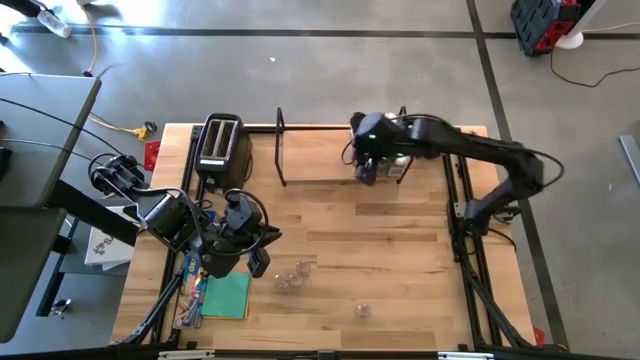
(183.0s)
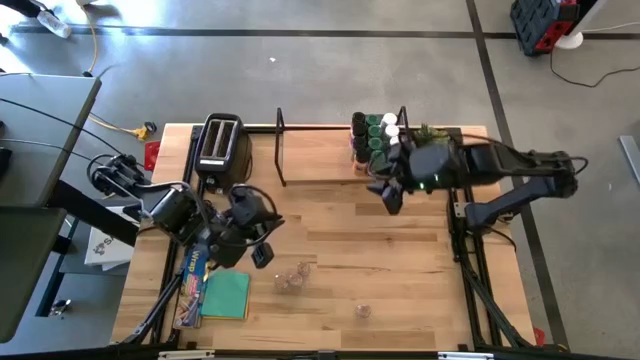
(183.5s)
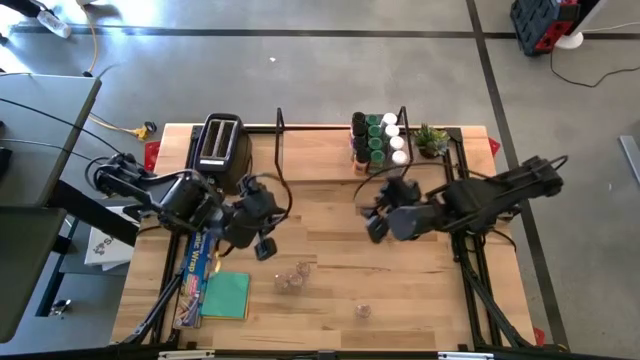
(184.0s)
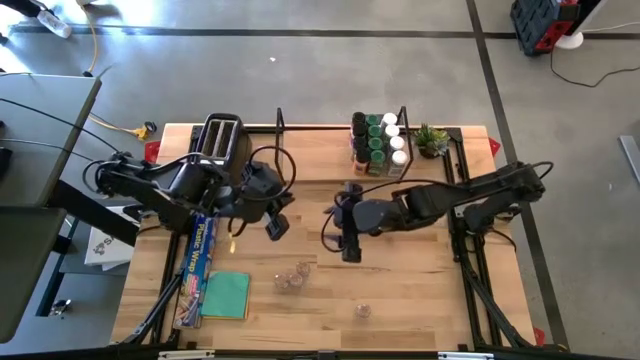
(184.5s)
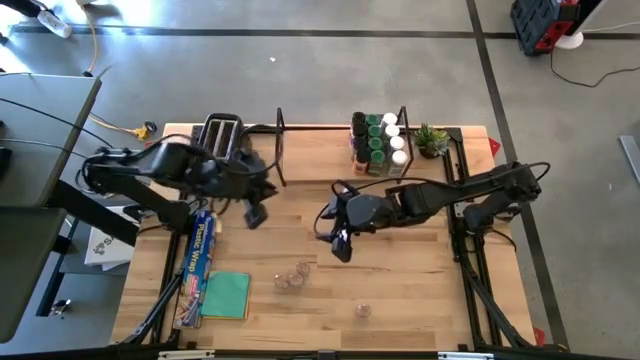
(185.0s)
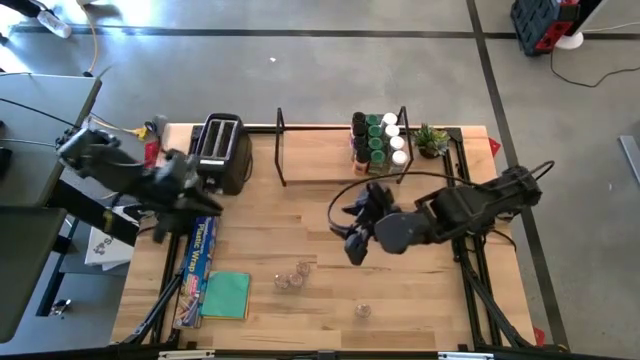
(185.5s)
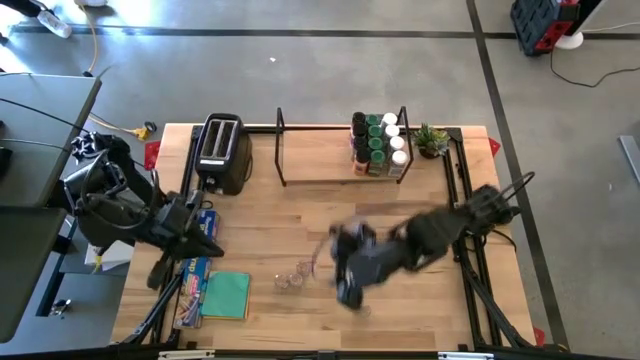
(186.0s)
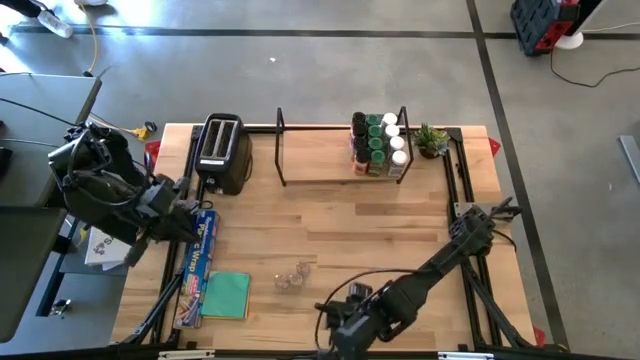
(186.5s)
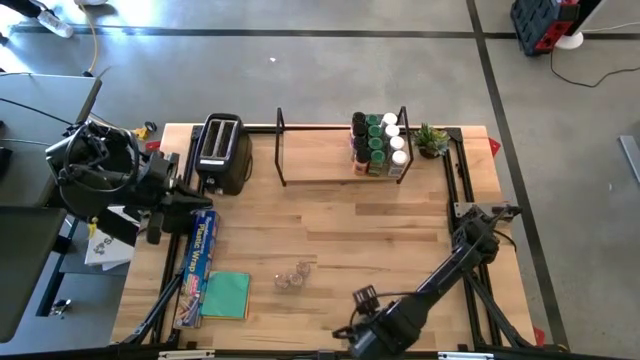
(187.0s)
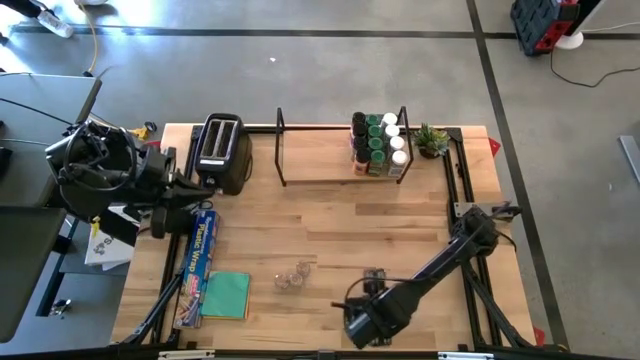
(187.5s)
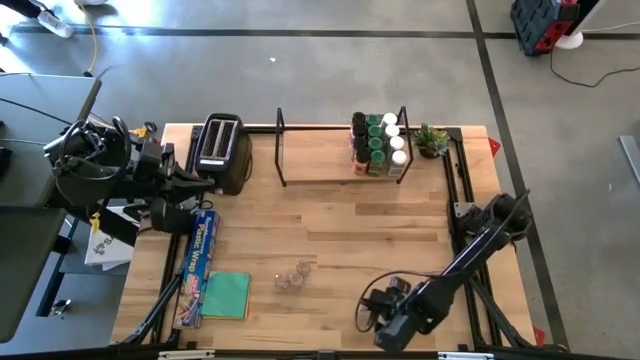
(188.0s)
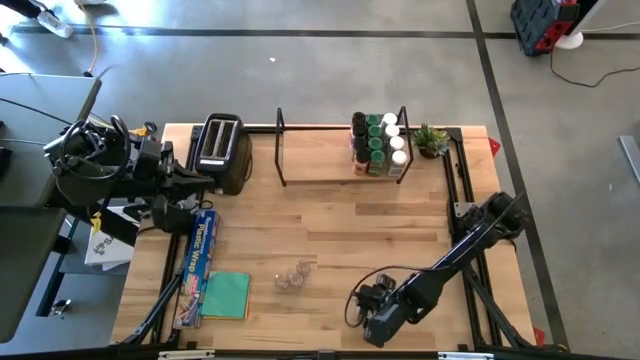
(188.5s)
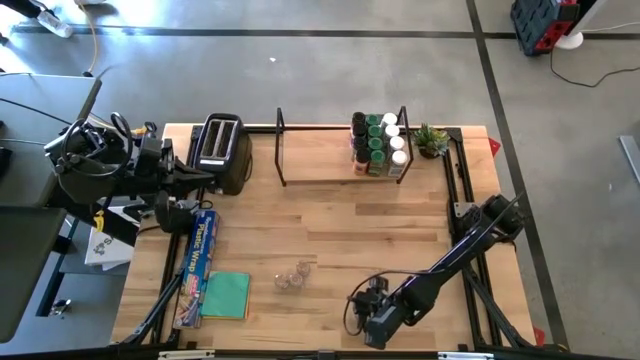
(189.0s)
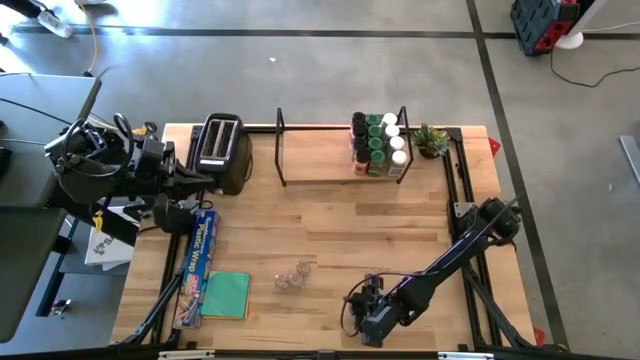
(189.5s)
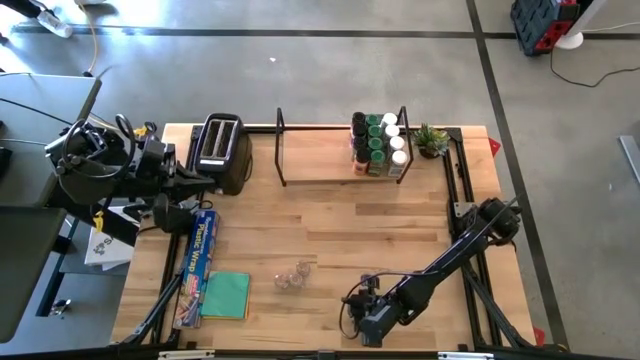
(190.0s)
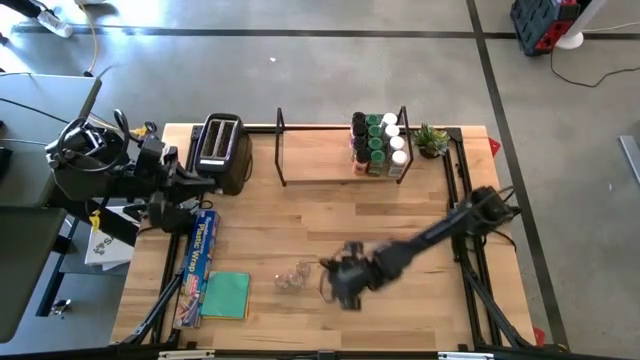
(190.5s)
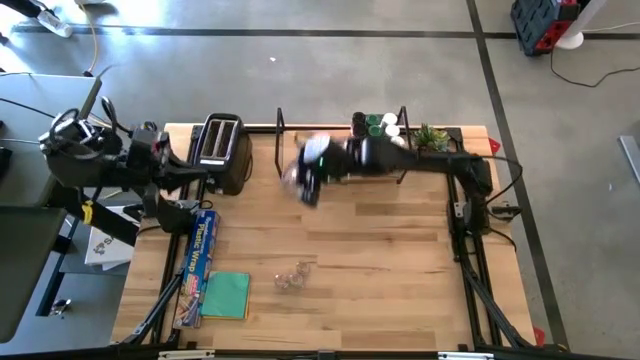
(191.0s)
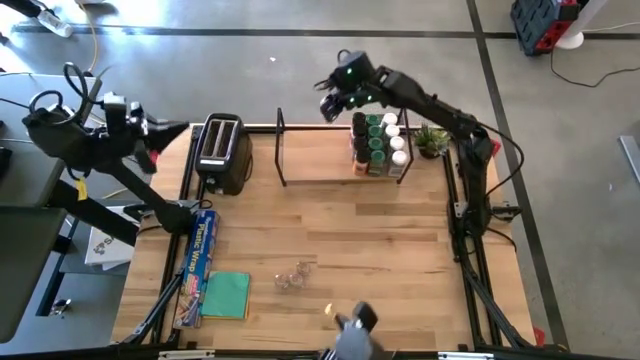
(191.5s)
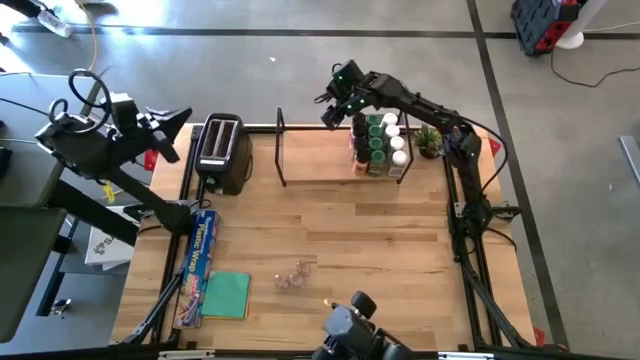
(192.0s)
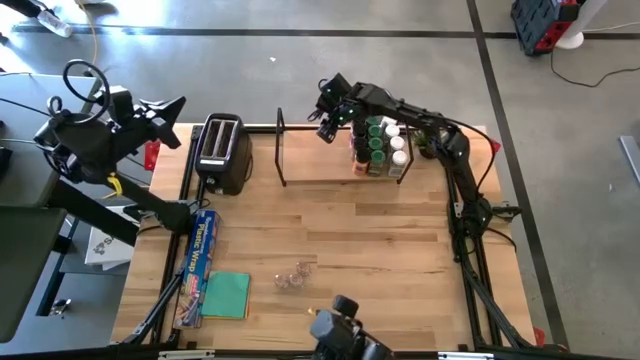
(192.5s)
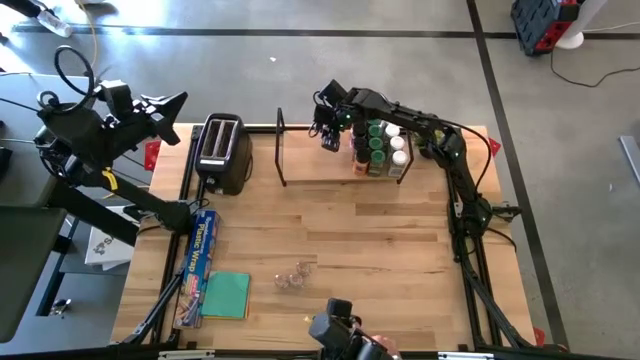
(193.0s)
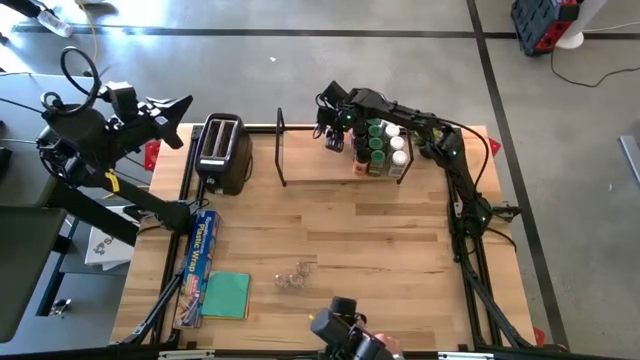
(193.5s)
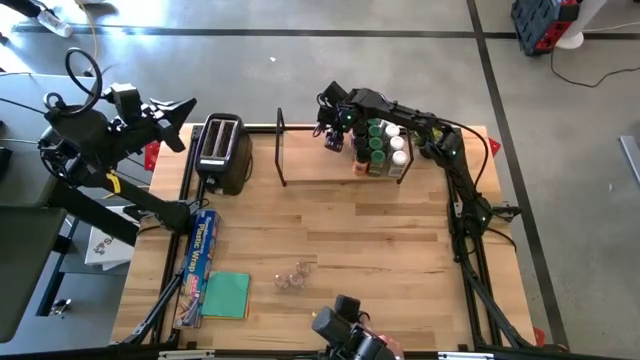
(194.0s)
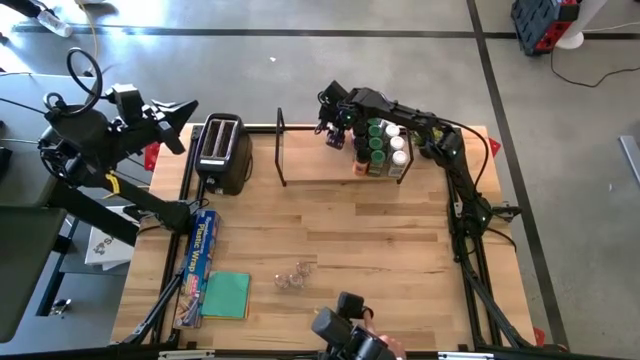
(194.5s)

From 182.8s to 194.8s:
Task: Shelf spices
Put the brown seasoning bottle on the shelf

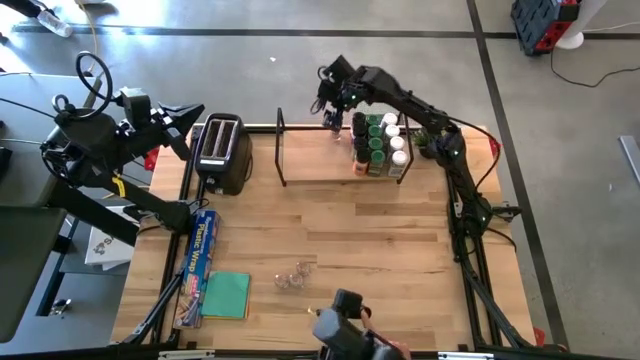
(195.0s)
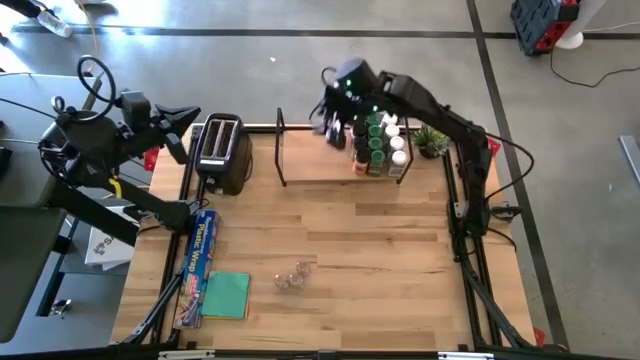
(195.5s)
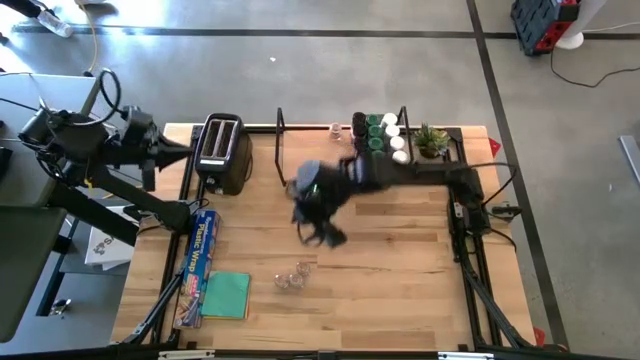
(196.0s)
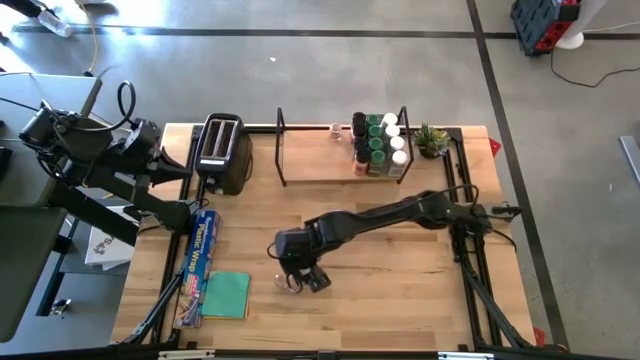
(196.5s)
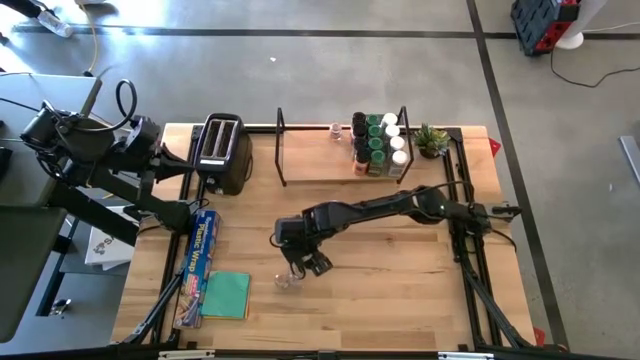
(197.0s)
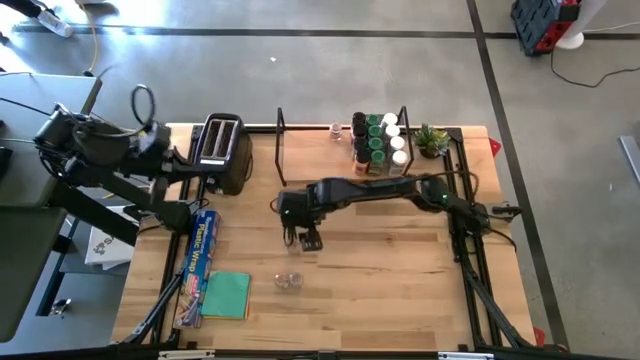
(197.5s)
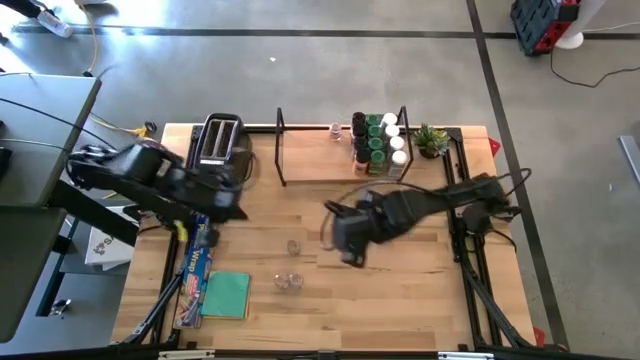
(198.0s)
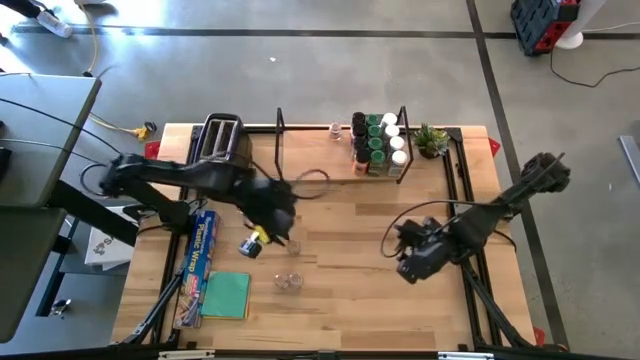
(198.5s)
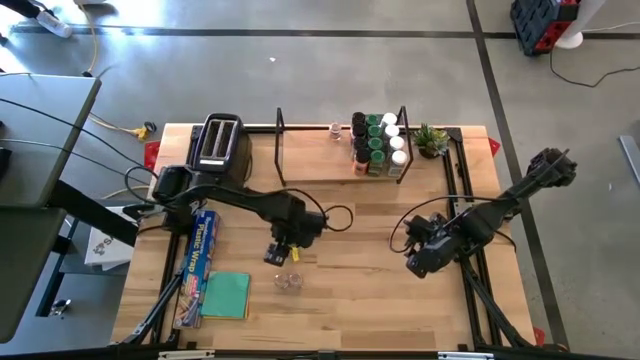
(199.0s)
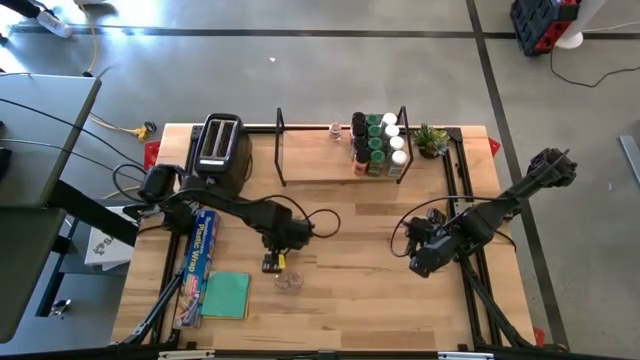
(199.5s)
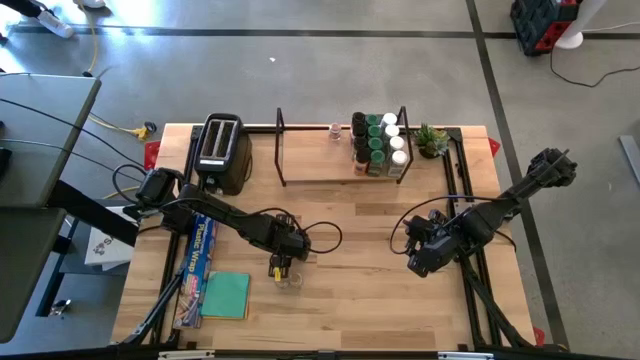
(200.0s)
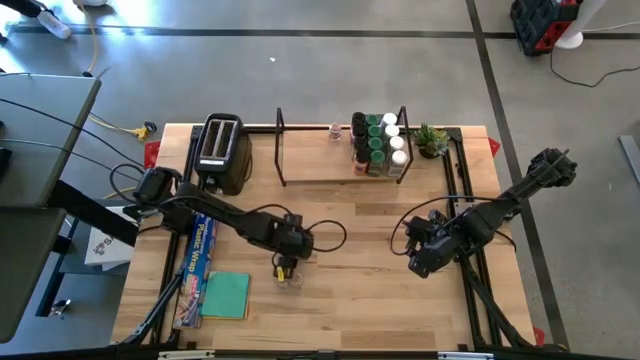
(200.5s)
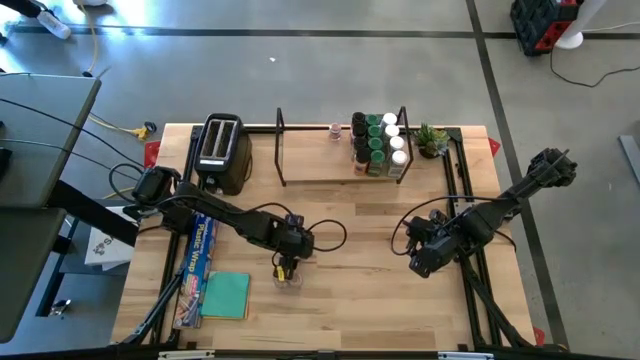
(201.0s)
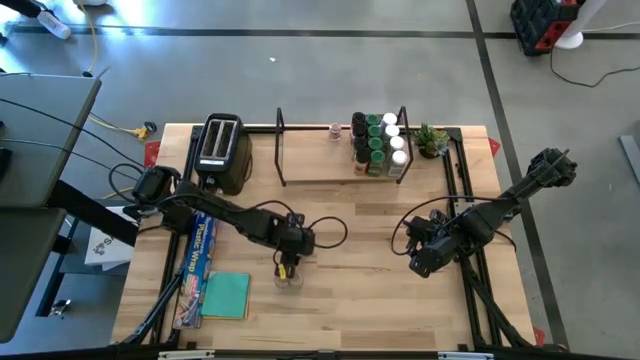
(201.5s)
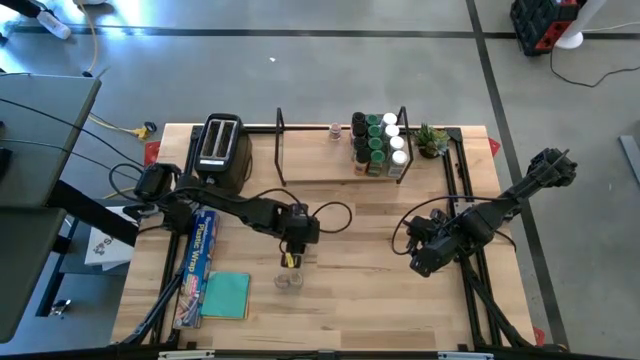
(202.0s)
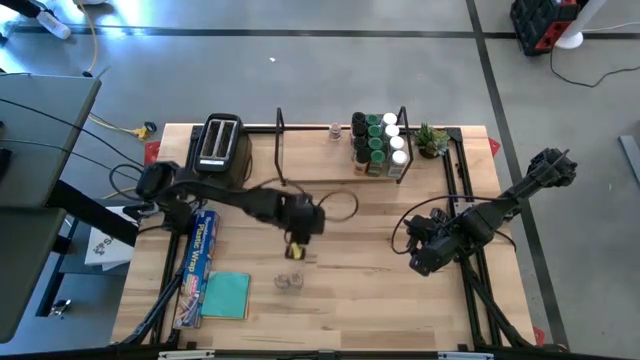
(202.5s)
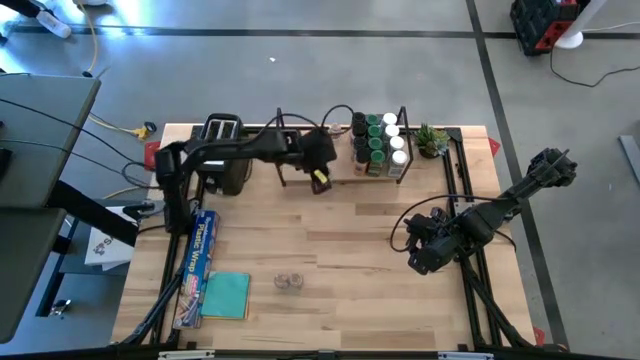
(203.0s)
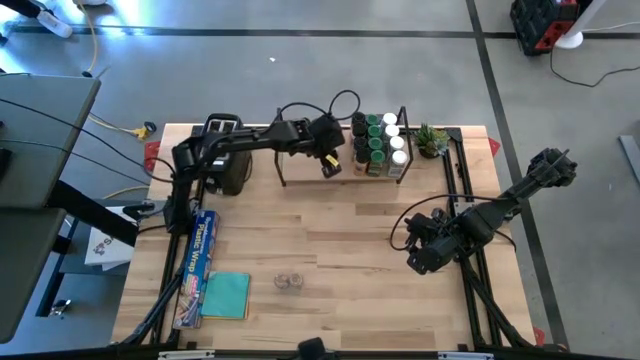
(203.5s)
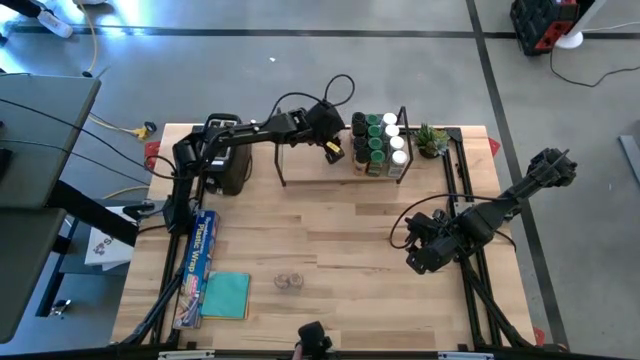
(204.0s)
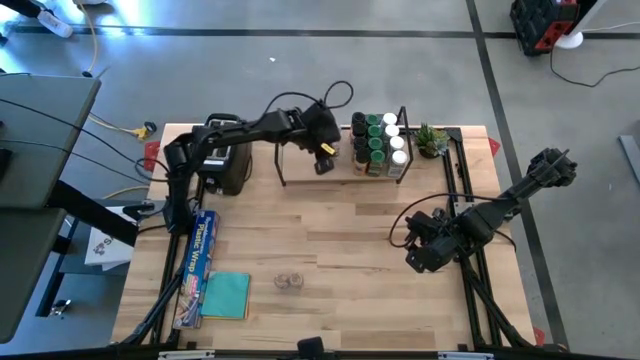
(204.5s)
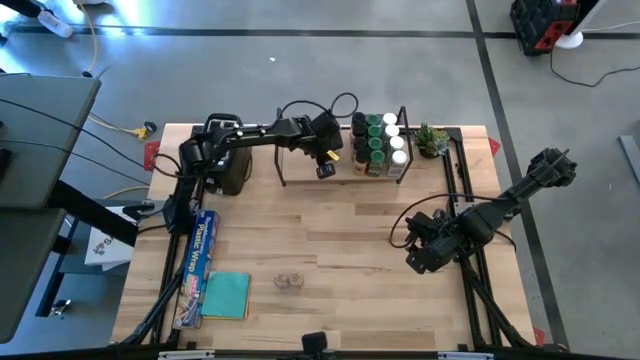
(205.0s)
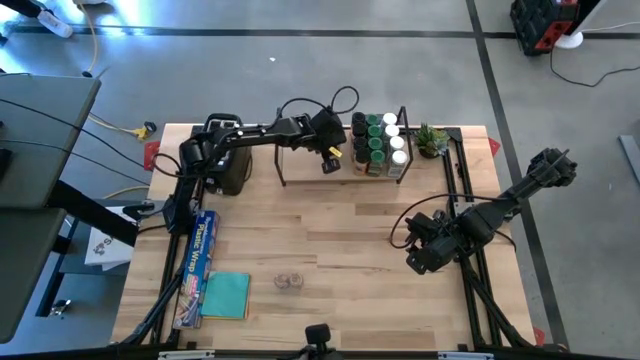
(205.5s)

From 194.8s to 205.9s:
Put the brown seasoning bottle on the shelf and align it with the other brown seasoning bottle
